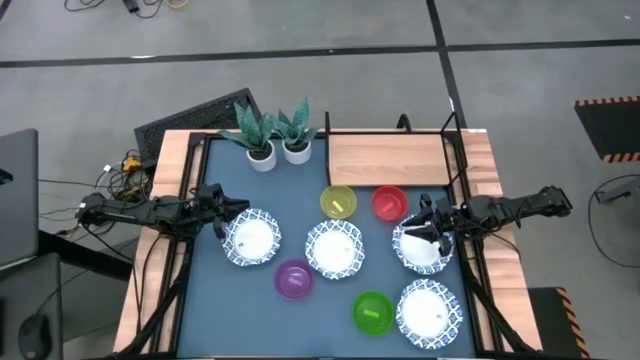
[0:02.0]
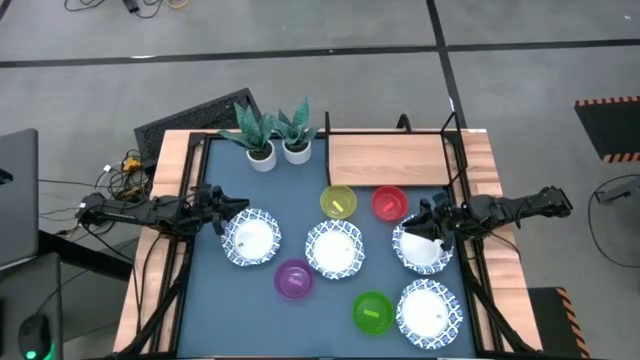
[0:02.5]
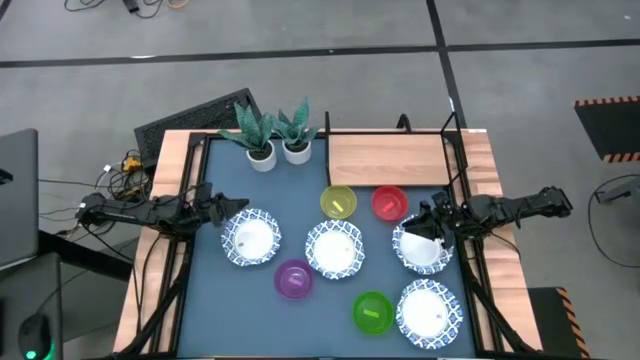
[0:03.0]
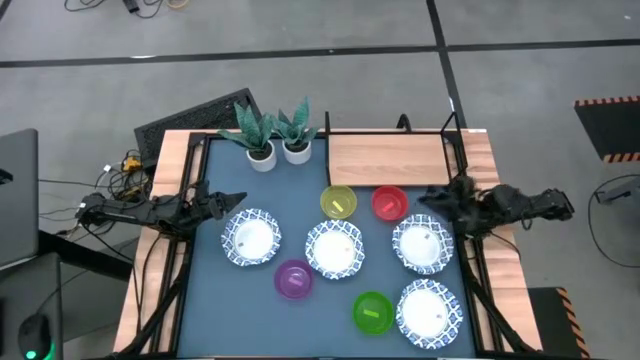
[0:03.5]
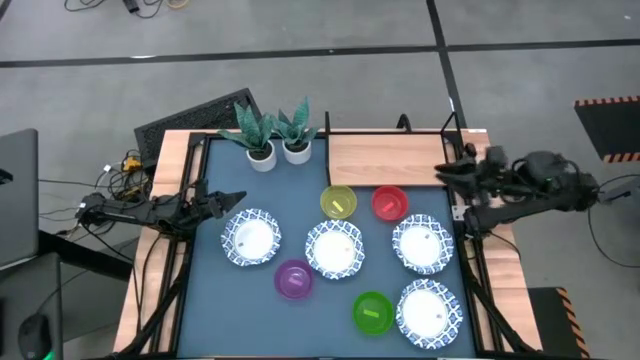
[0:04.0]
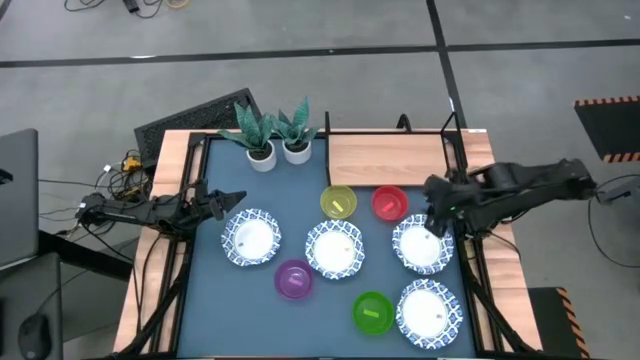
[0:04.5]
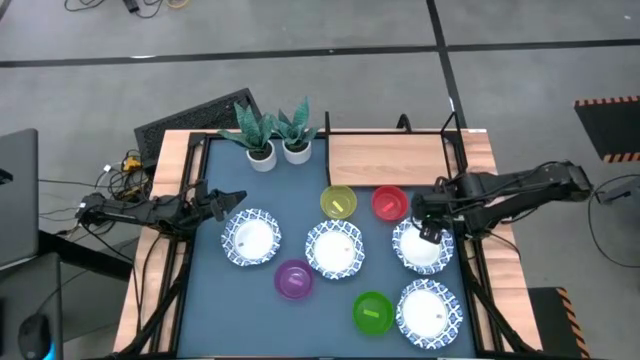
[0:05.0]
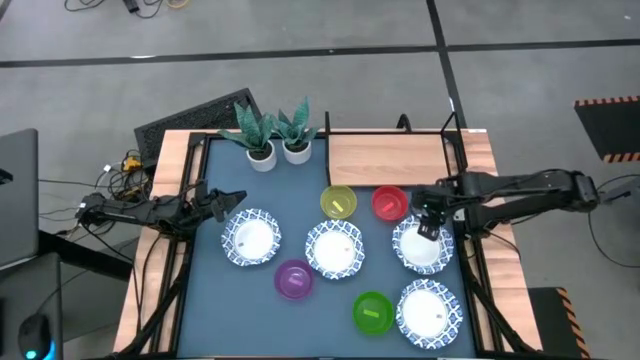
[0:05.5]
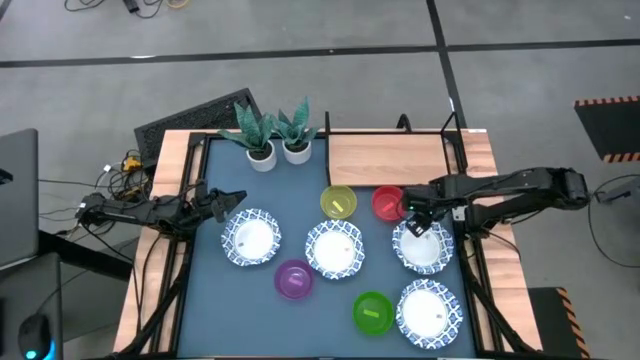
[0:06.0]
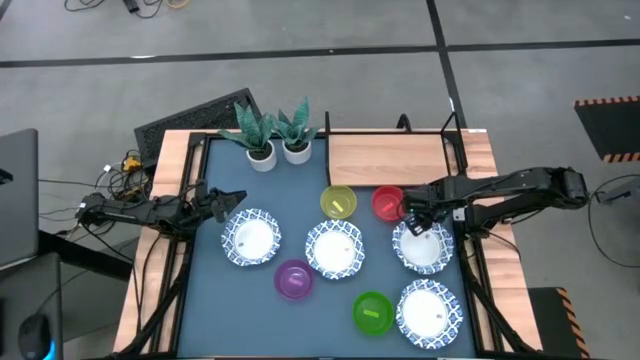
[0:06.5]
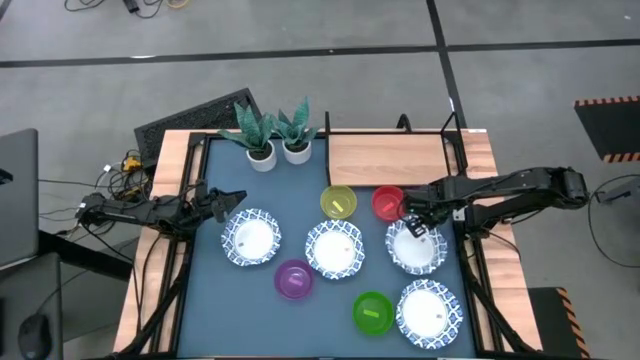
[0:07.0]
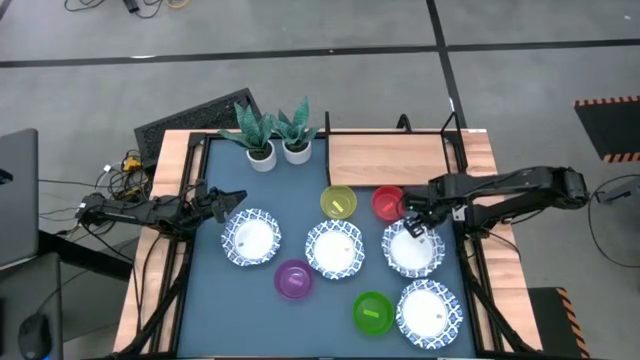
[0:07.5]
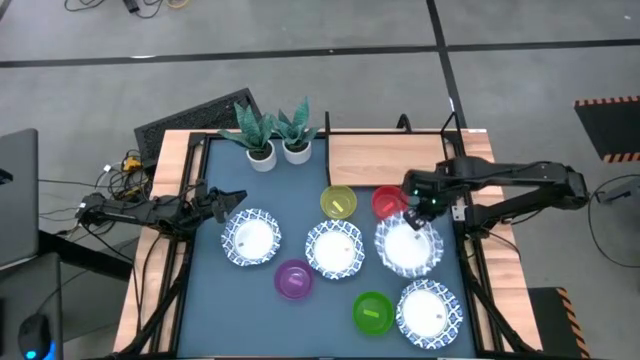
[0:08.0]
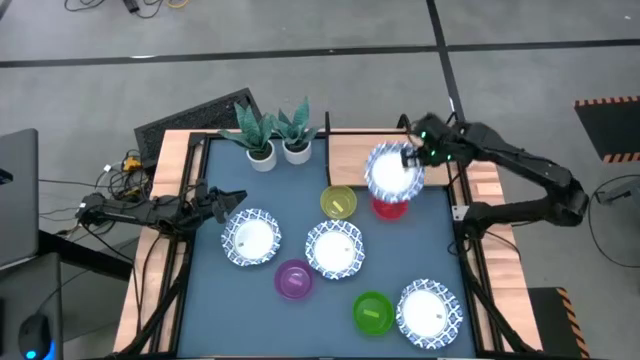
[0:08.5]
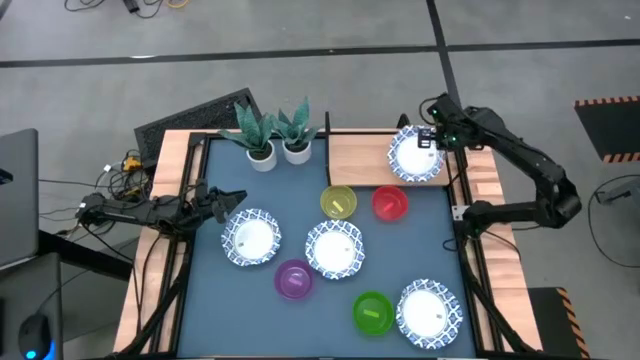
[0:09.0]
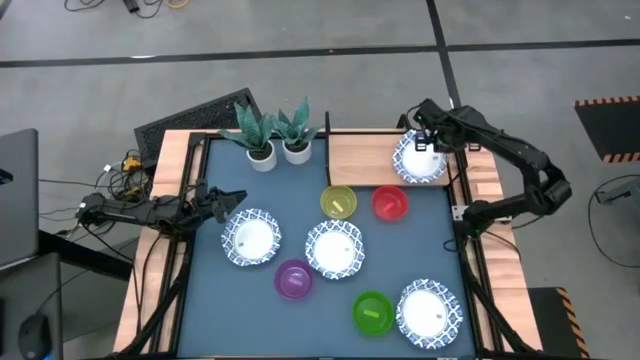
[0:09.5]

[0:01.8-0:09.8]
Task: Place and stack bowls onto a shelf
Put the white patterned bowl on the shelf

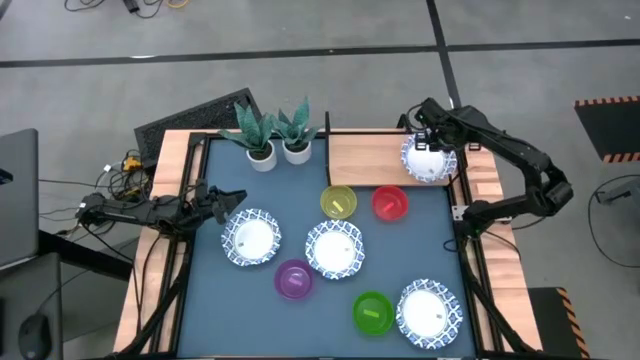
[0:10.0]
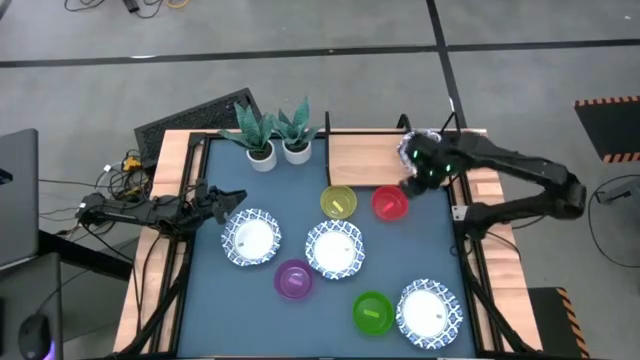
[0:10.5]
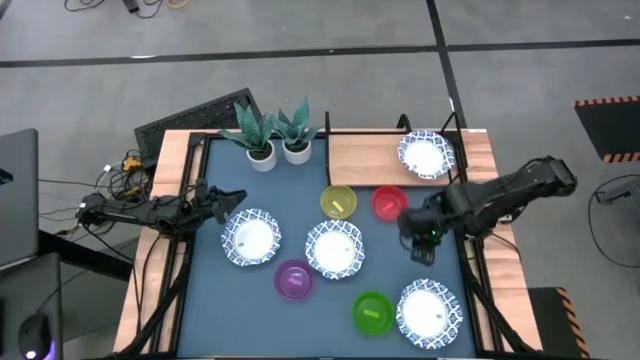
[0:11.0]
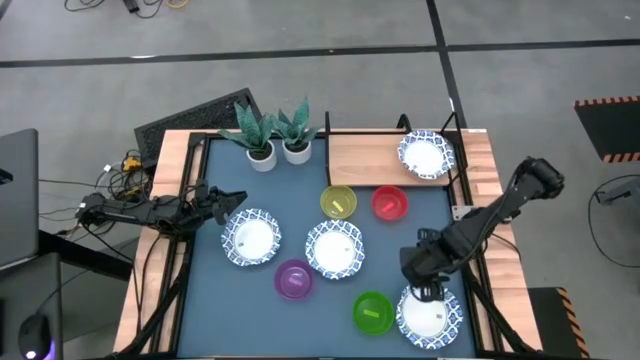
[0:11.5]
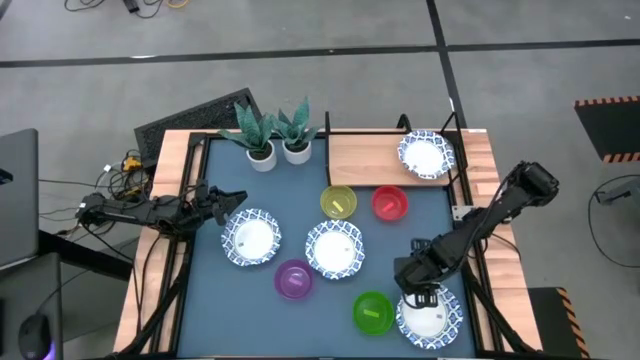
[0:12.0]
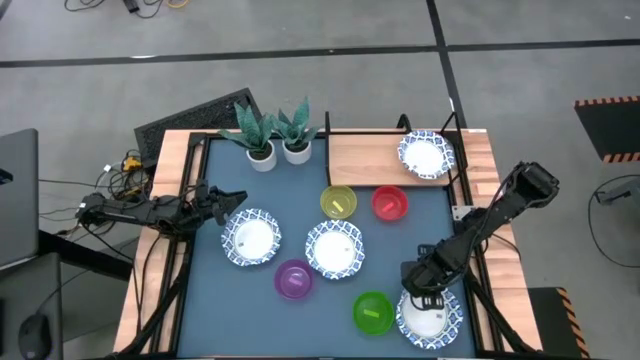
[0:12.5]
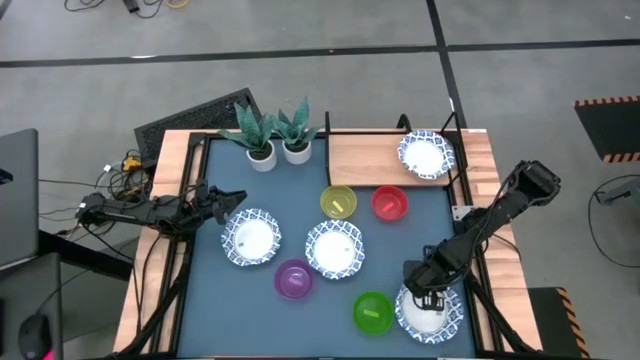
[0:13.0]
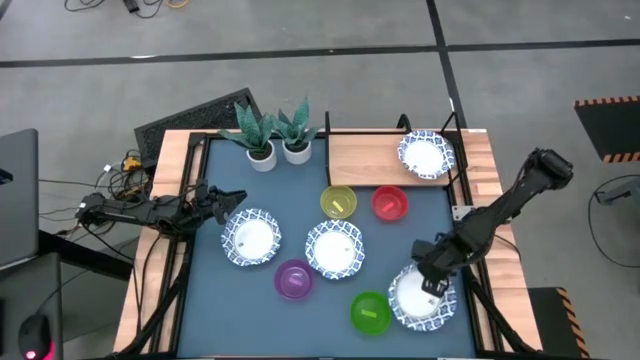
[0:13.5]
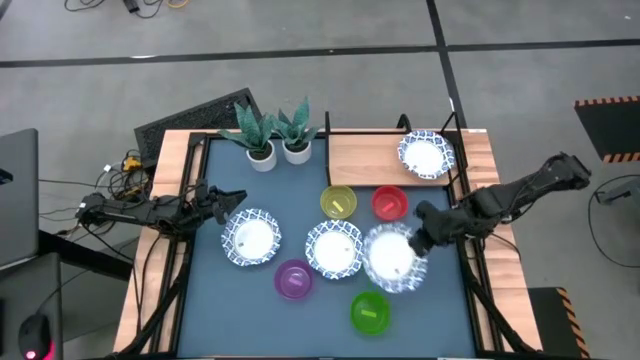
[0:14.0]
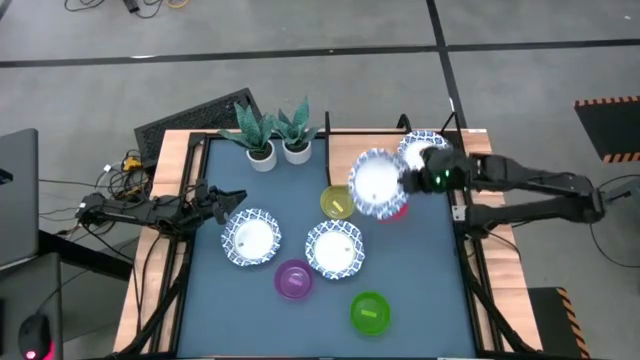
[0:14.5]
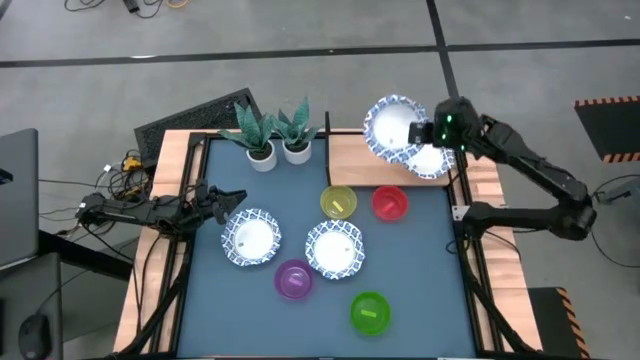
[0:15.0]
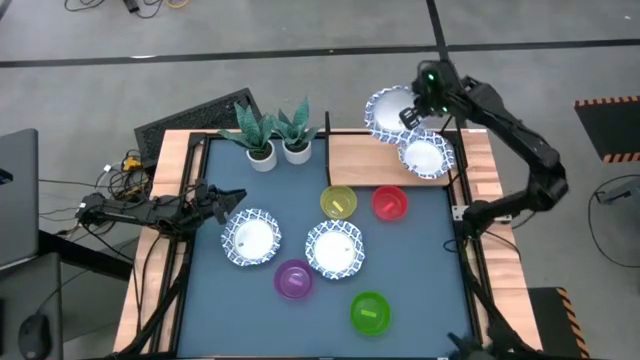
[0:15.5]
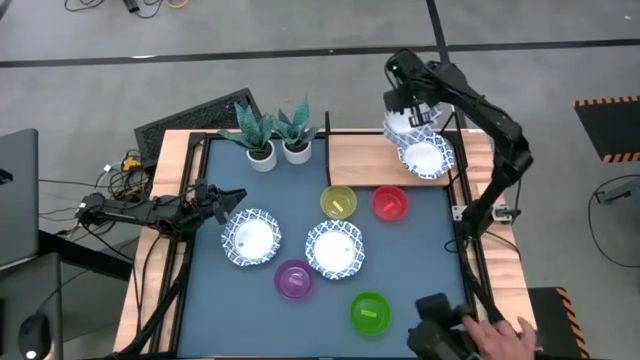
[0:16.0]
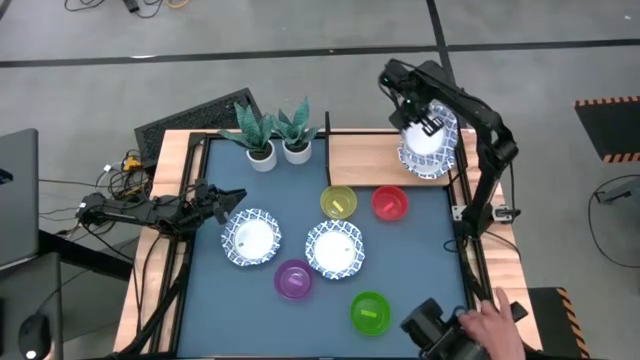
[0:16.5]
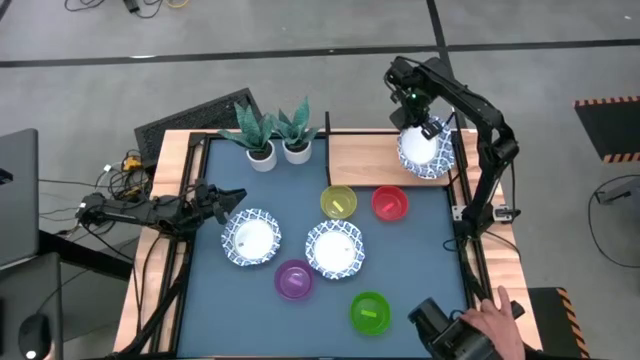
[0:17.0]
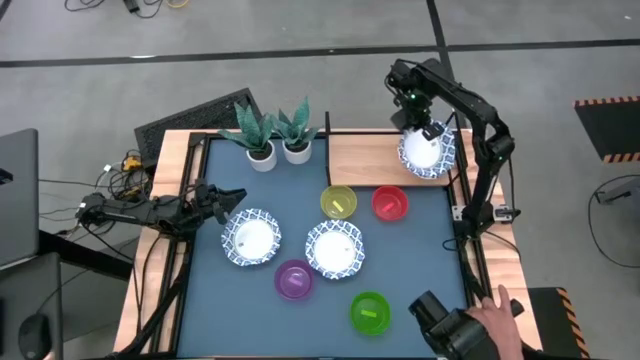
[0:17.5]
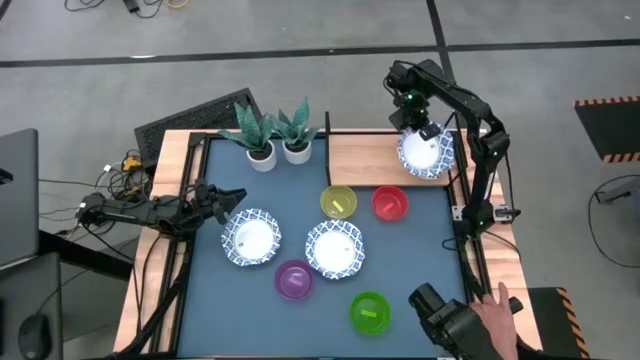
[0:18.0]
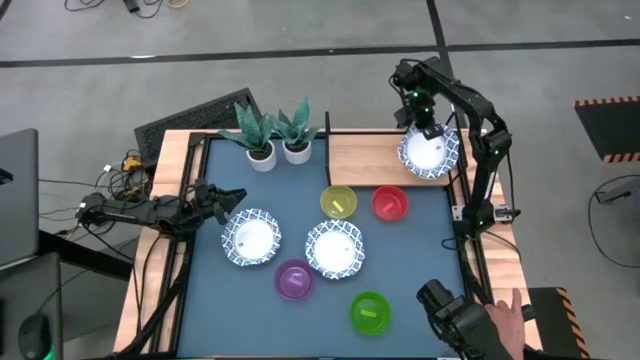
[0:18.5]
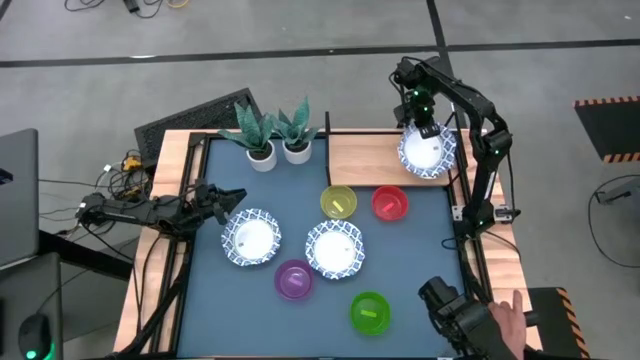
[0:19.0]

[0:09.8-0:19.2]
Stack the white patterned bowl on the white patterned bowl on the shelf

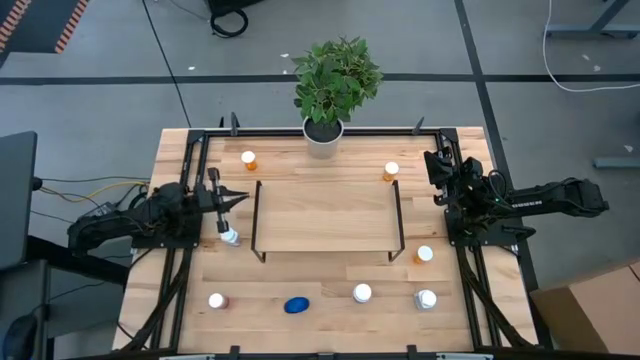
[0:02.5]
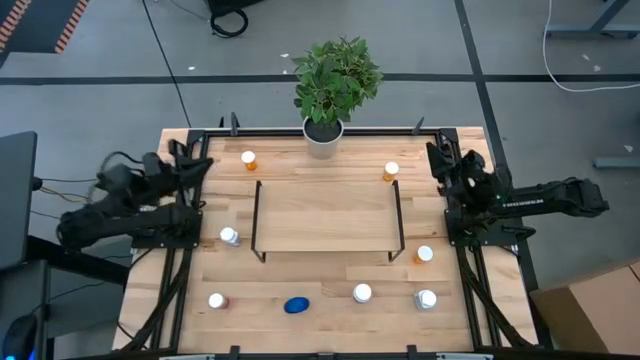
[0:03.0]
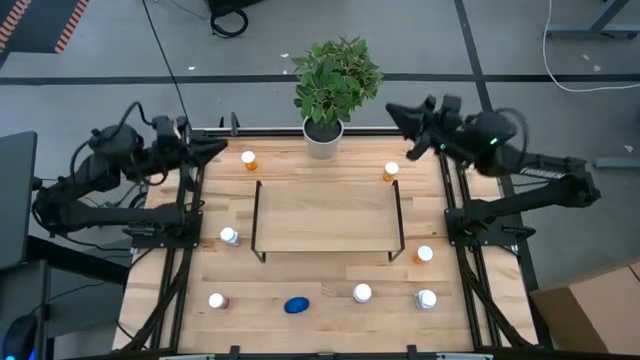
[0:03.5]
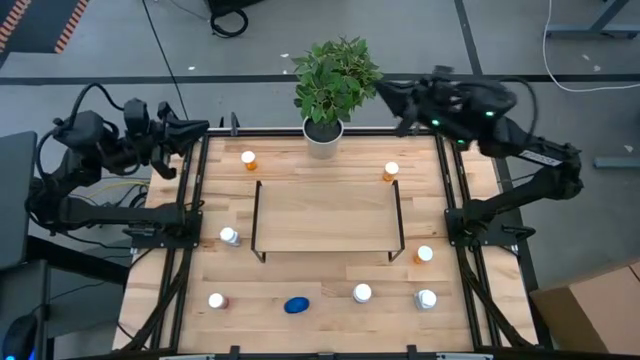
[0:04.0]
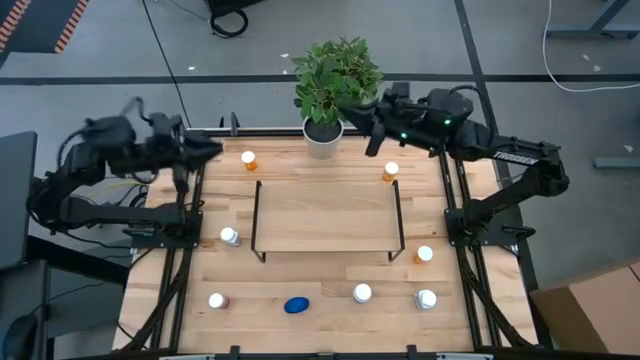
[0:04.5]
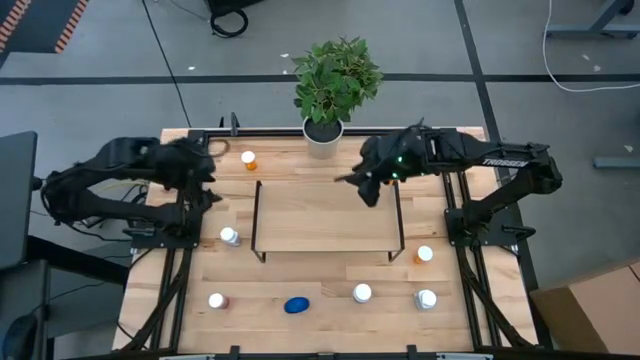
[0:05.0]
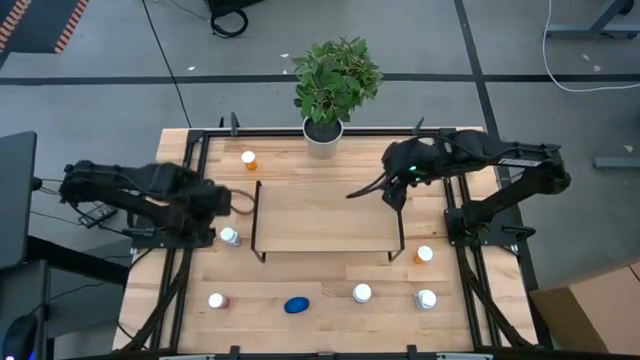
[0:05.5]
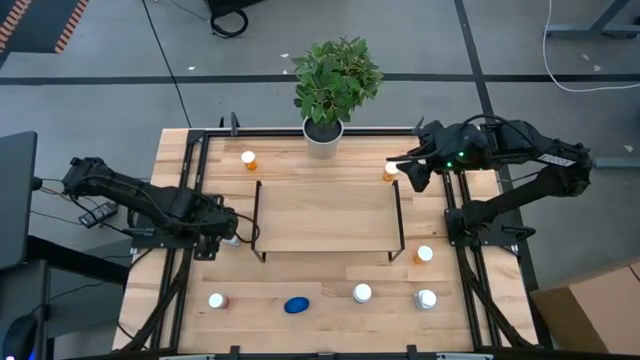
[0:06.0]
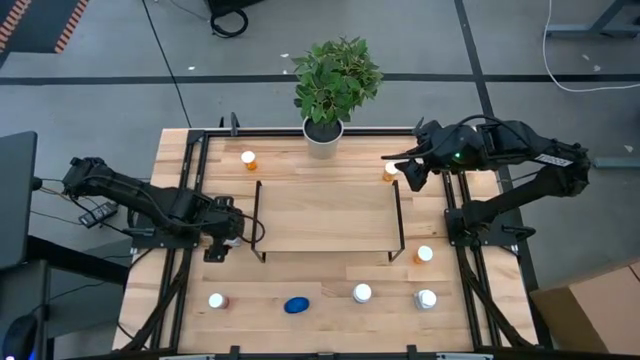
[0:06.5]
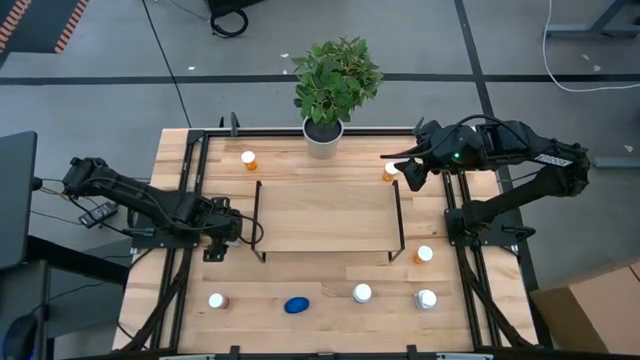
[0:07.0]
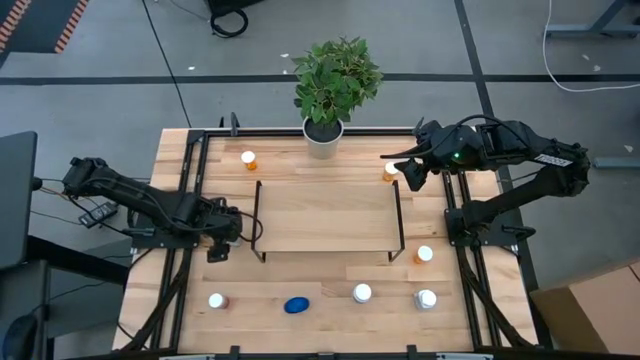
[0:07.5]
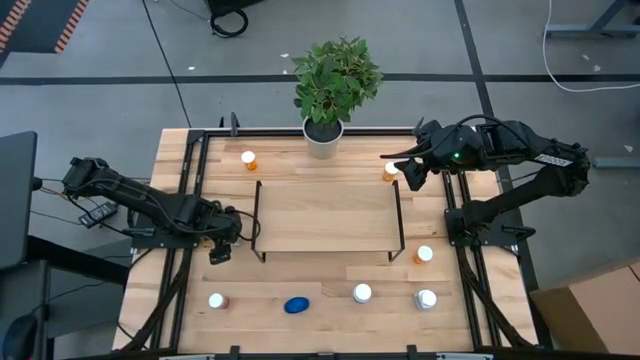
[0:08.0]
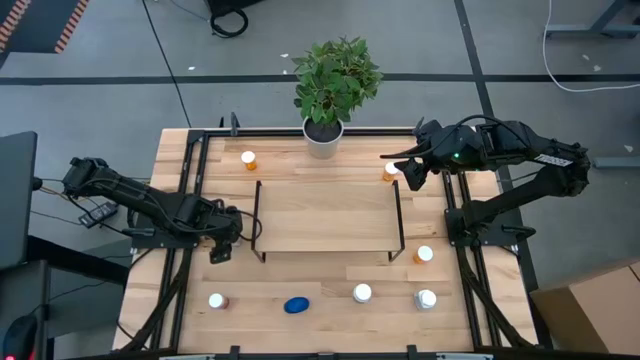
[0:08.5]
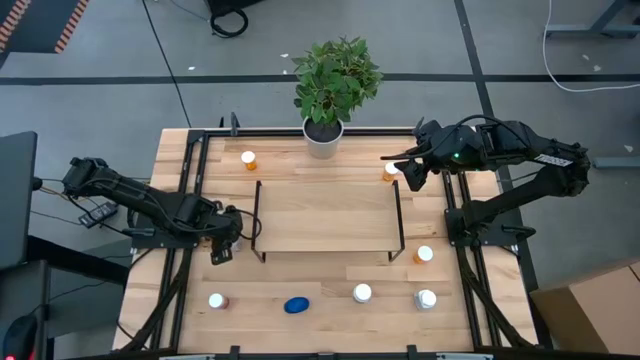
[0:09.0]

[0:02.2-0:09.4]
Task: Pick and place medicine bottles onto shelf by color
Put the top left white and blue pill bottle on the shelf
